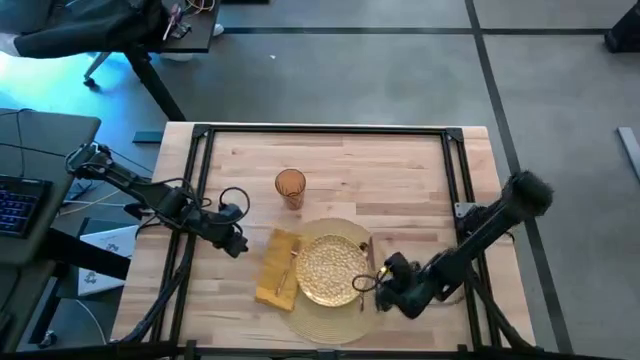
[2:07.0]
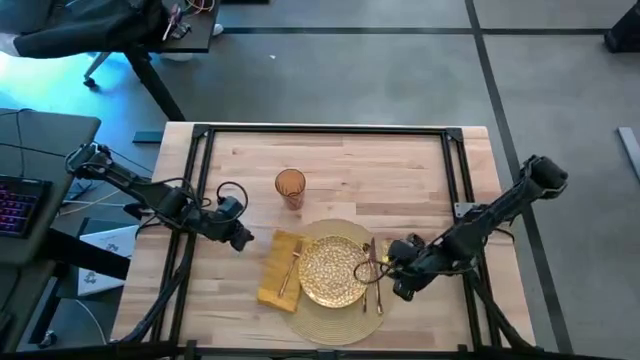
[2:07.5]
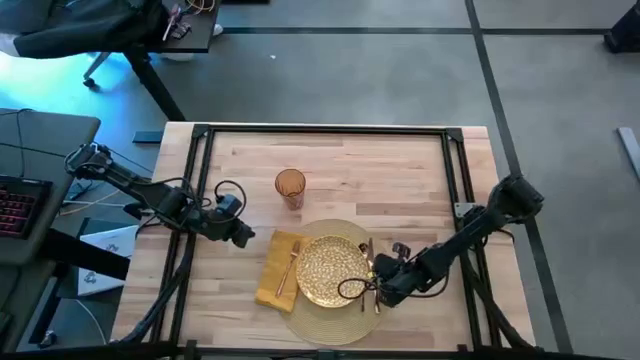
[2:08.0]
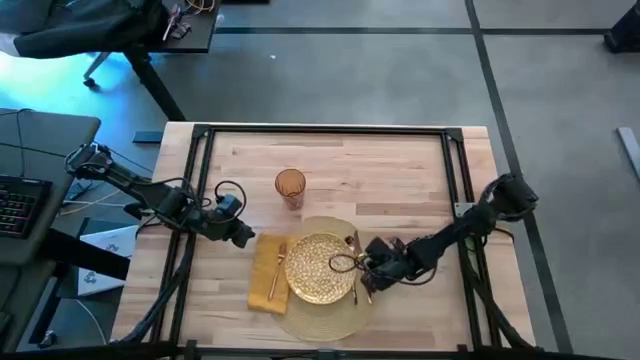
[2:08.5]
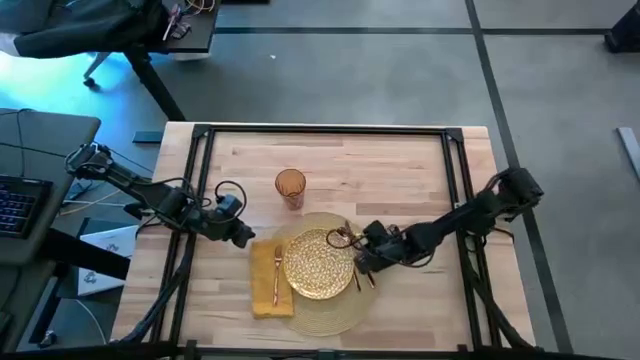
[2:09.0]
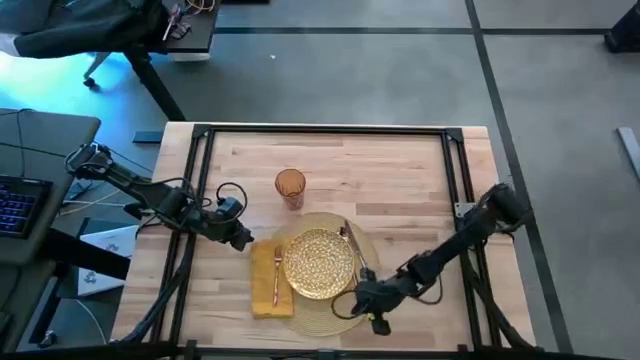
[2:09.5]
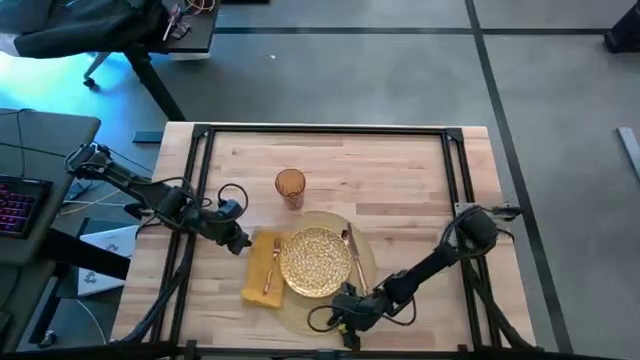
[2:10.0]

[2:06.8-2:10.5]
Task: Set table place
Adjust the yellow tablemat

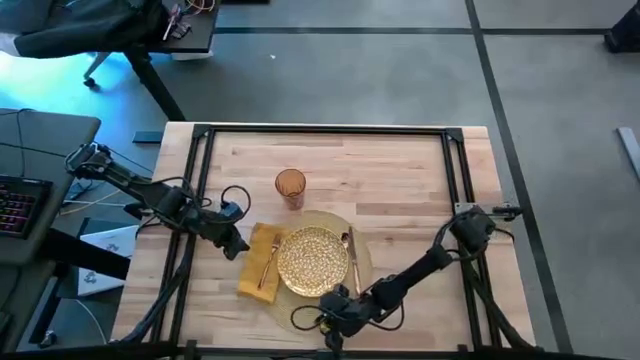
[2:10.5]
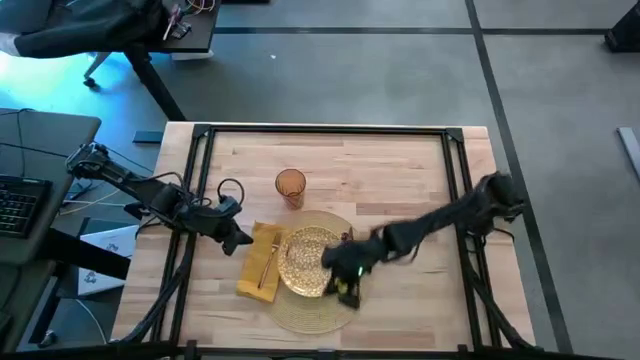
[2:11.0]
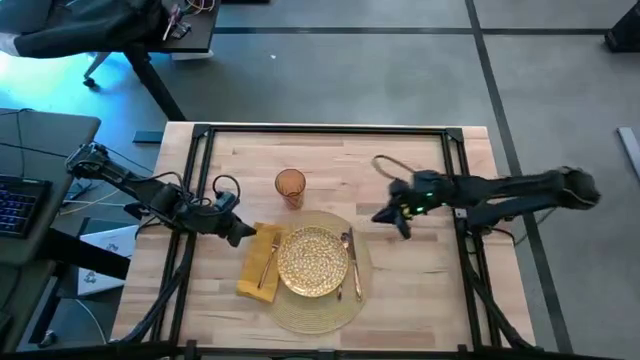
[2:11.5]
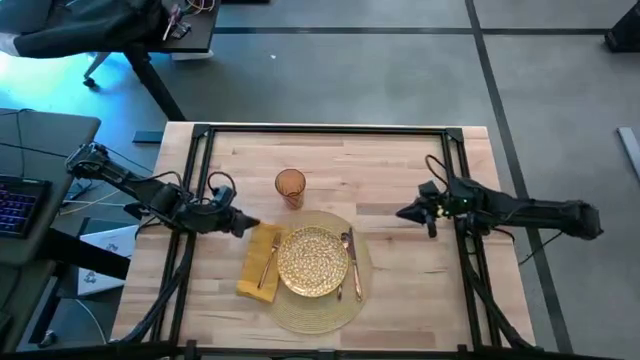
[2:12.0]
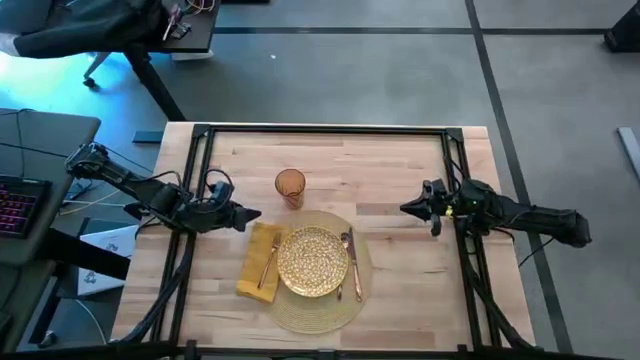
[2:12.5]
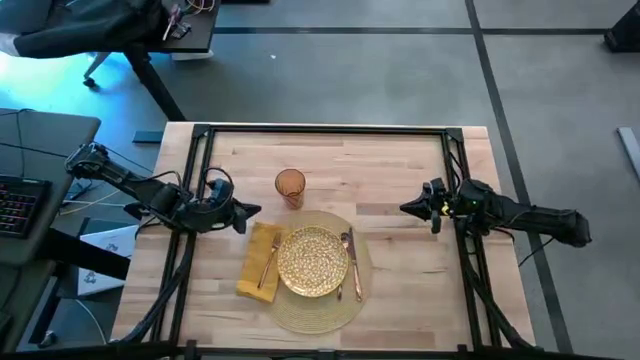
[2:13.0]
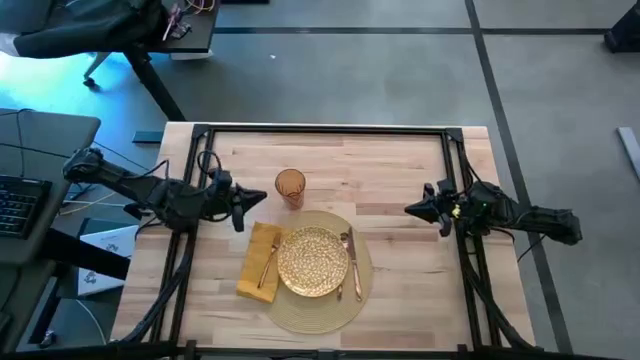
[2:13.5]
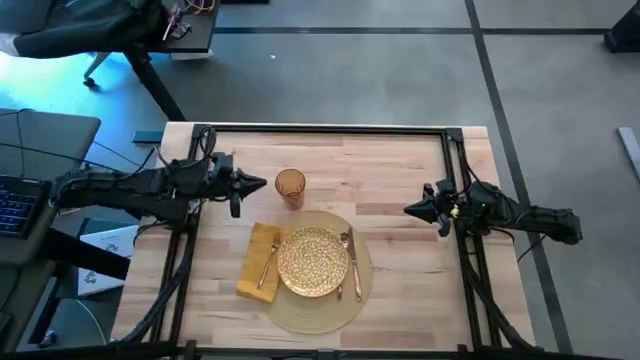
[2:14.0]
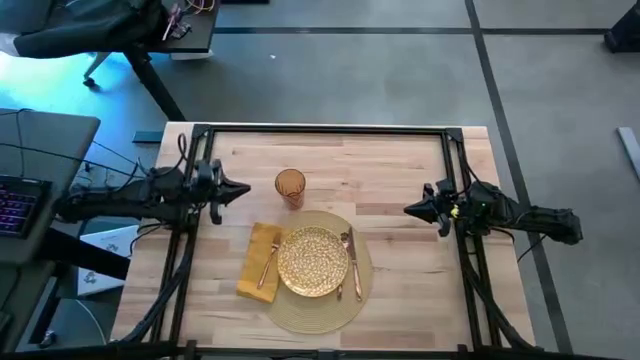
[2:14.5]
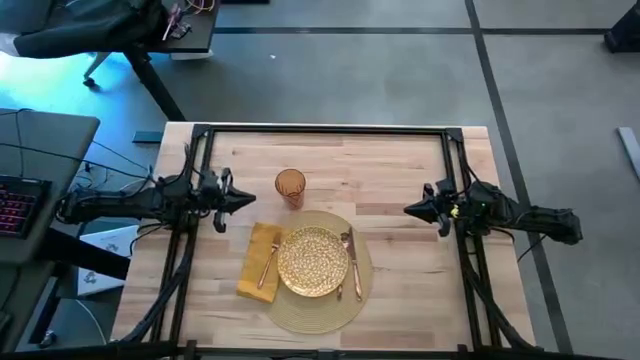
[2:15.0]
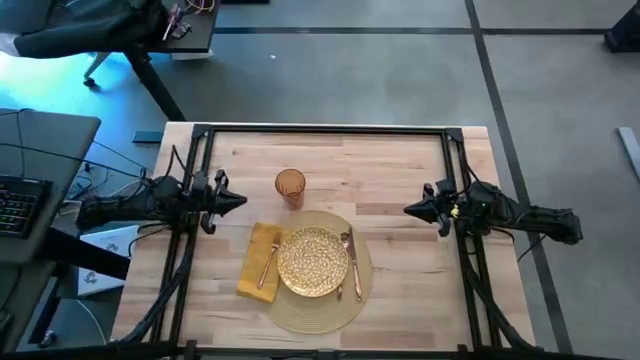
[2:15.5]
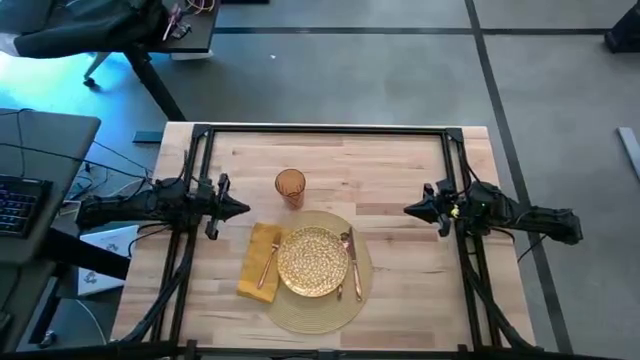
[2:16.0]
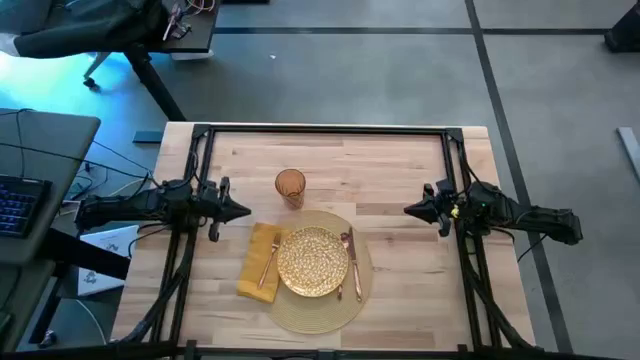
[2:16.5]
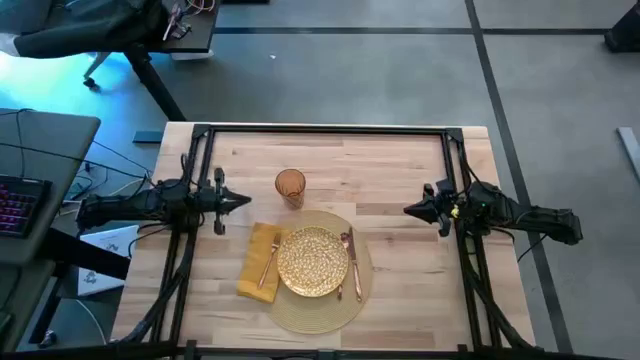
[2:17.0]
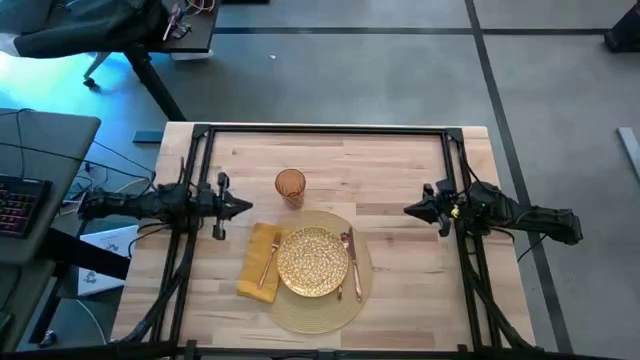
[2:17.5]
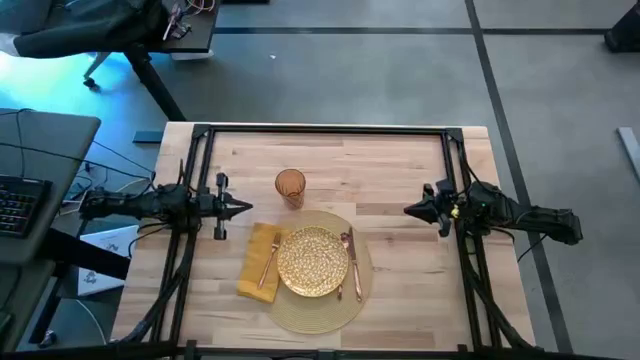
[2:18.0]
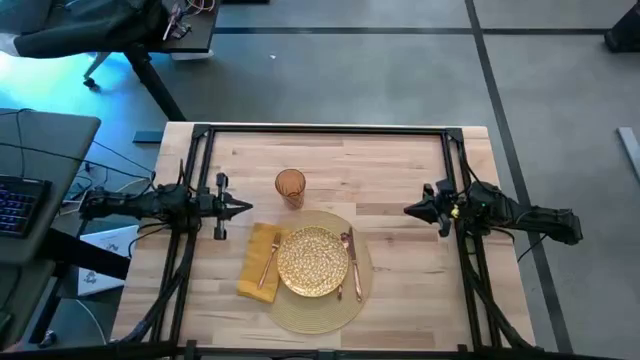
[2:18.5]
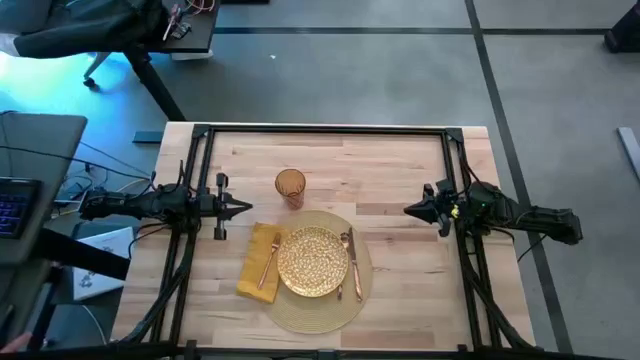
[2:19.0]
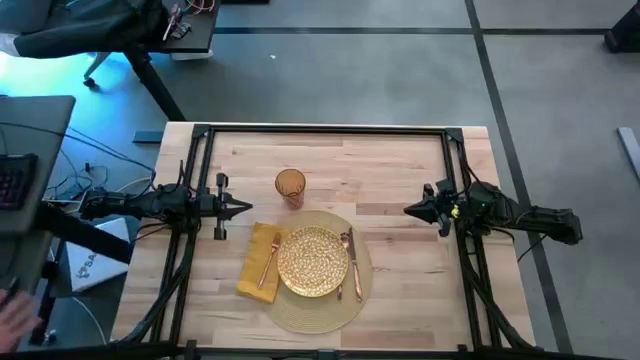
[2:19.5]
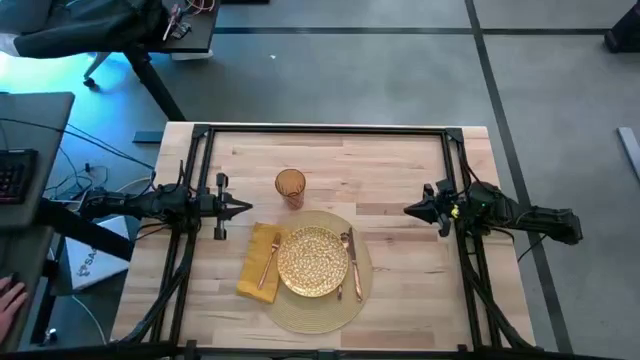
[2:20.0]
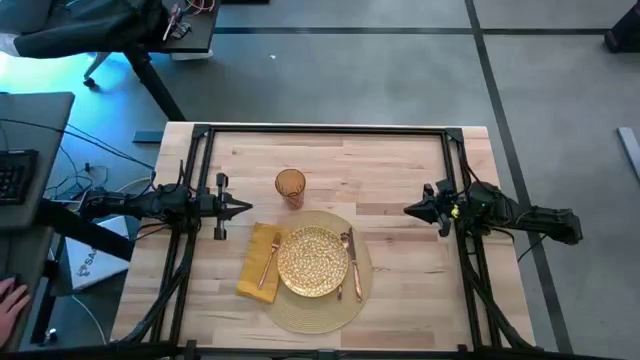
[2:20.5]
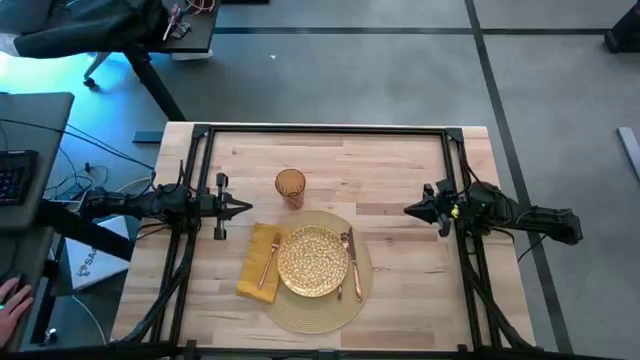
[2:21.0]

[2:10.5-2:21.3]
Return to Home Position

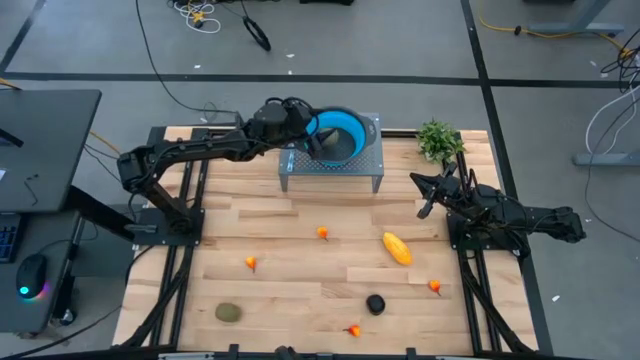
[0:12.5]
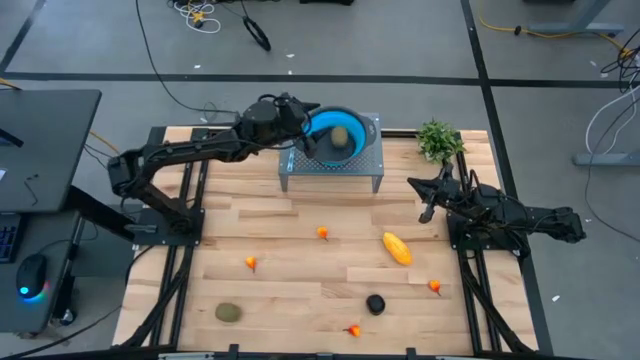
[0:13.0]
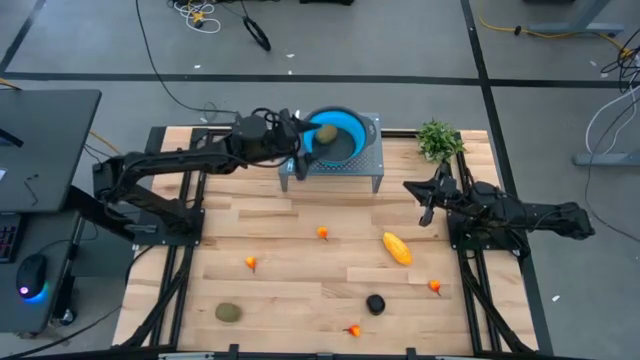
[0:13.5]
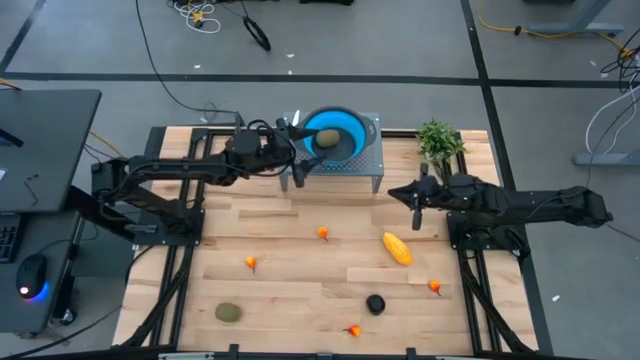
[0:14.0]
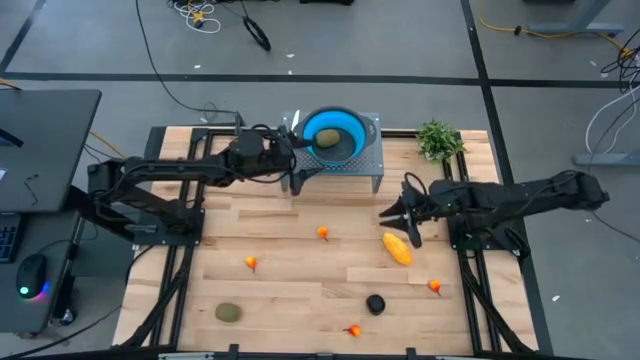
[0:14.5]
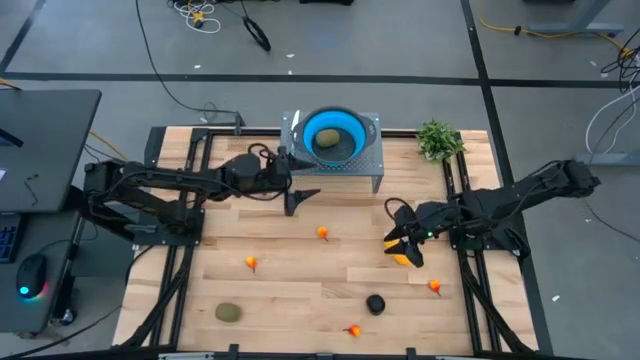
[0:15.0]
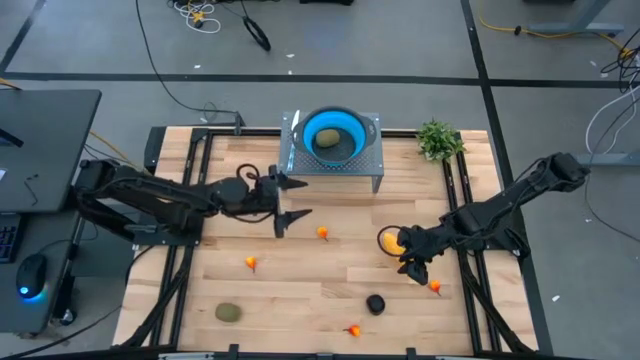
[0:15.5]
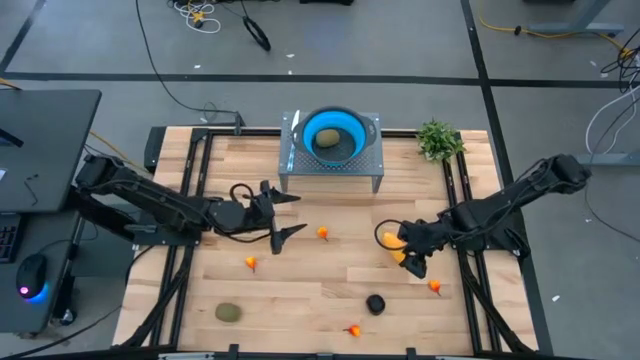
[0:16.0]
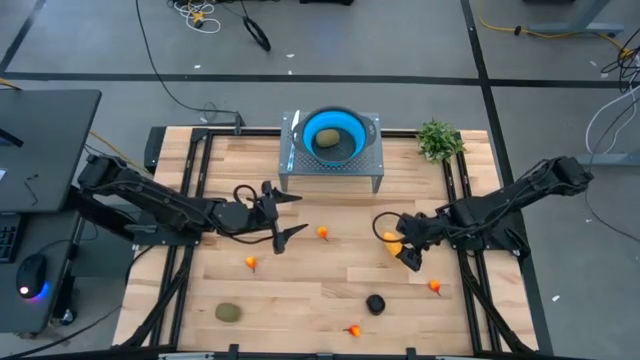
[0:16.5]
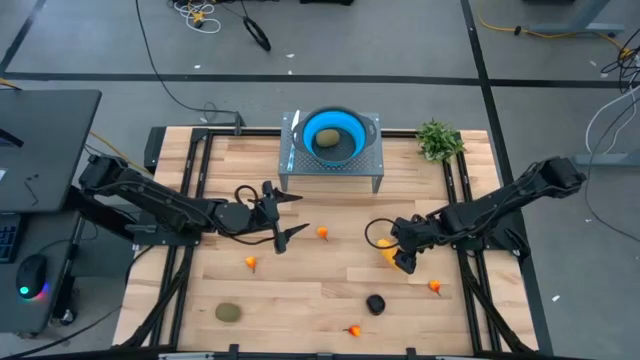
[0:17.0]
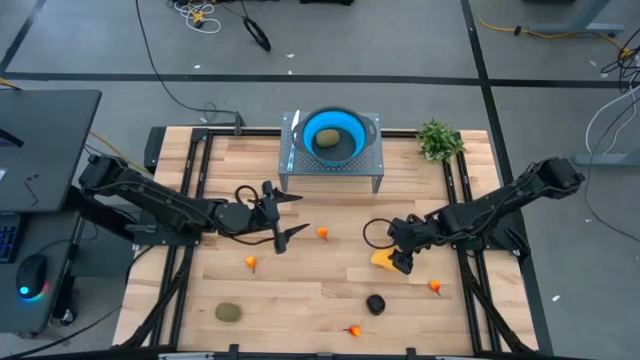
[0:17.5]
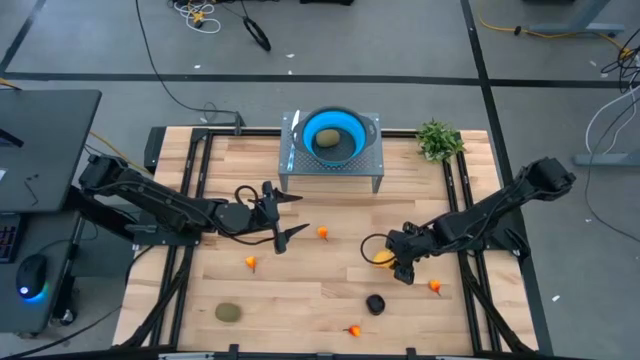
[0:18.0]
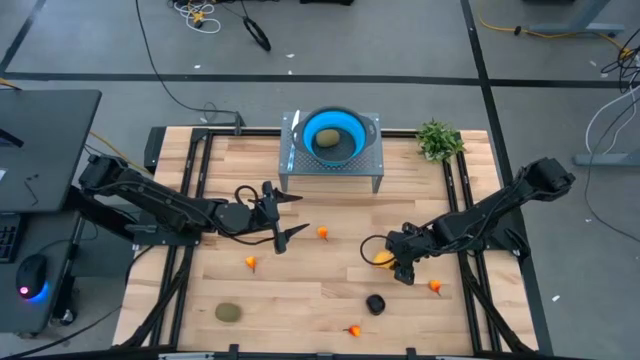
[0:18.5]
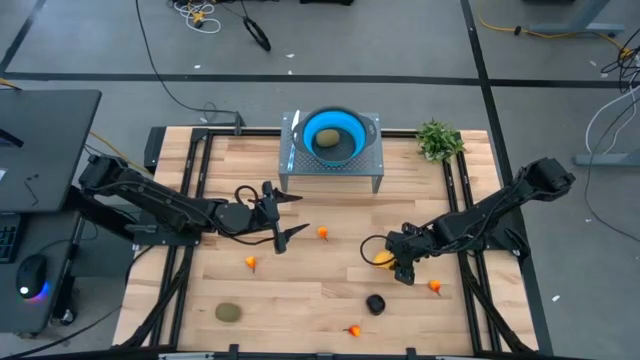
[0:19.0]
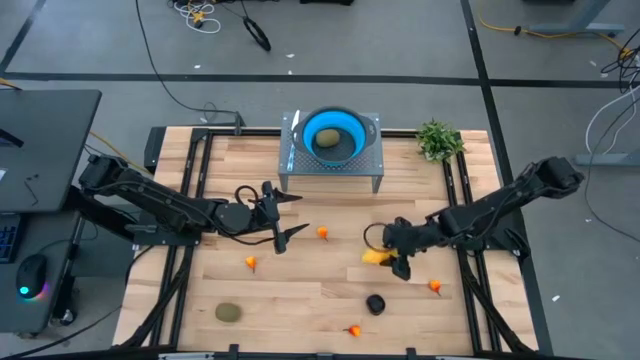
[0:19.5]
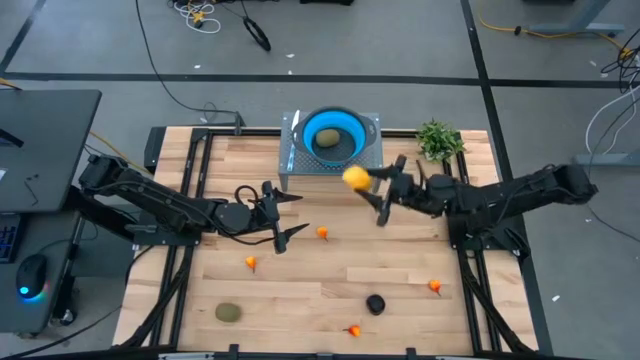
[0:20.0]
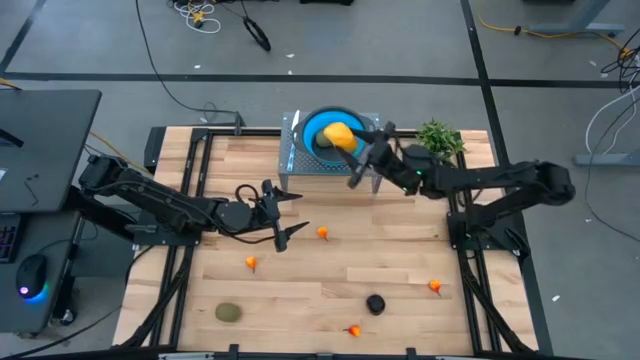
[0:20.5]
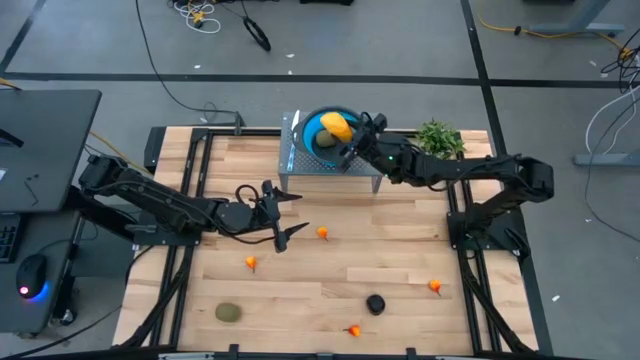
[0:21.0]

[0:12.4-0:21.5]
Task: Pick & Place Fruit
Put the yellow mango into the blue strainer bowl
